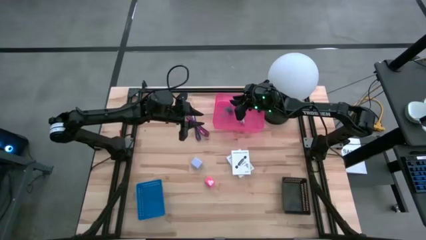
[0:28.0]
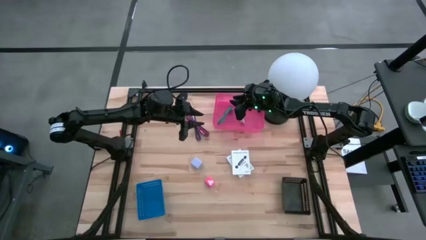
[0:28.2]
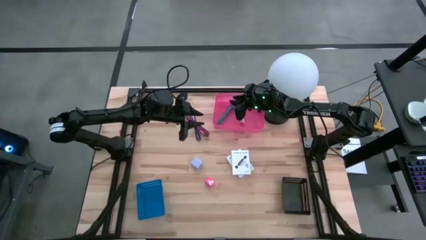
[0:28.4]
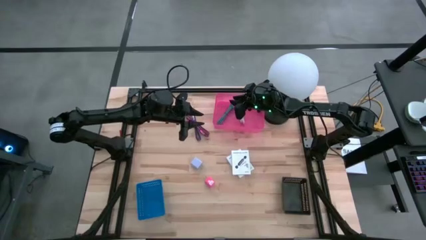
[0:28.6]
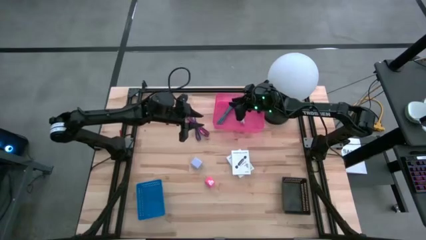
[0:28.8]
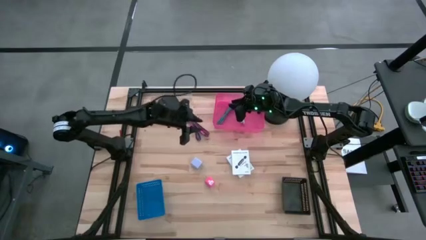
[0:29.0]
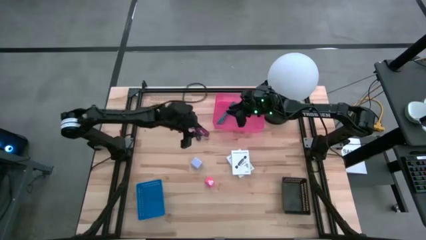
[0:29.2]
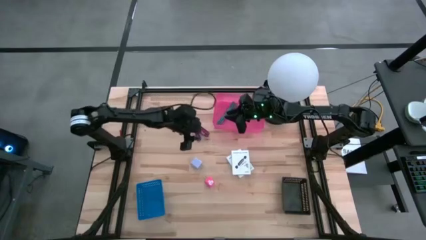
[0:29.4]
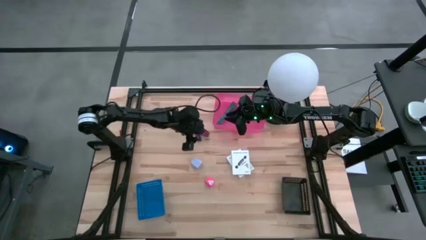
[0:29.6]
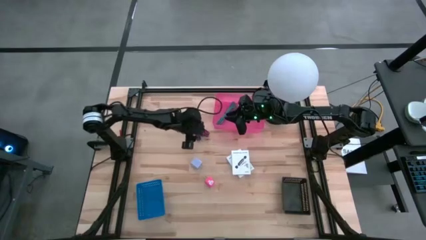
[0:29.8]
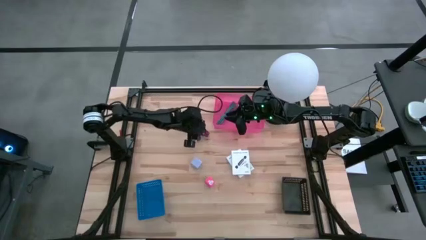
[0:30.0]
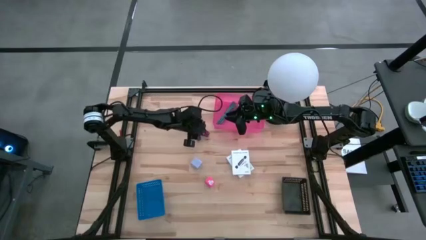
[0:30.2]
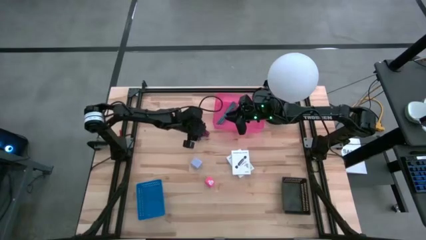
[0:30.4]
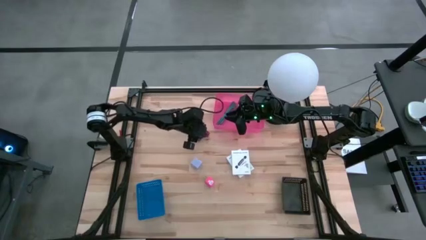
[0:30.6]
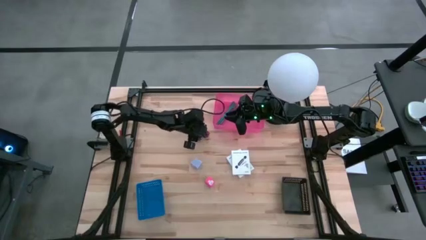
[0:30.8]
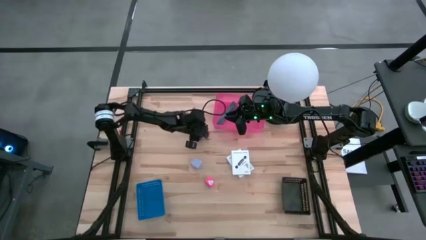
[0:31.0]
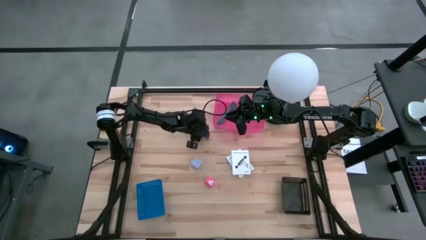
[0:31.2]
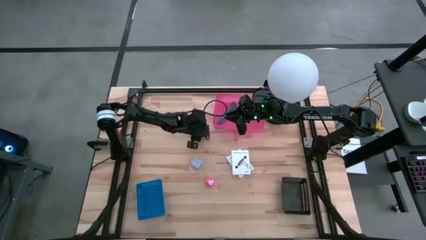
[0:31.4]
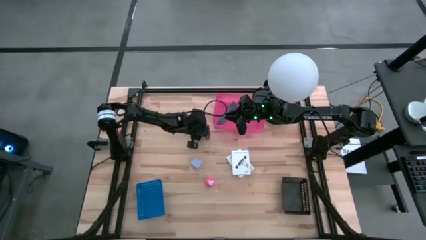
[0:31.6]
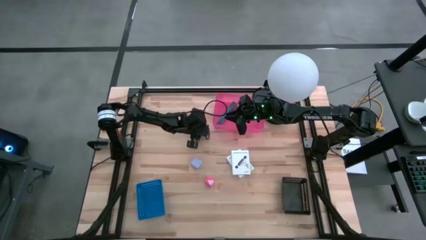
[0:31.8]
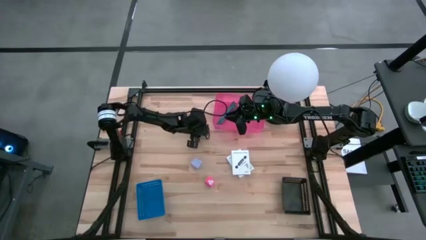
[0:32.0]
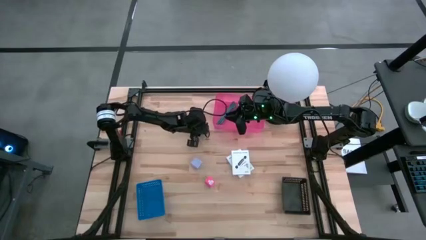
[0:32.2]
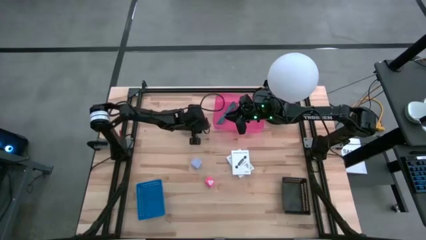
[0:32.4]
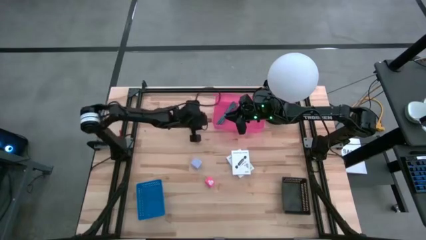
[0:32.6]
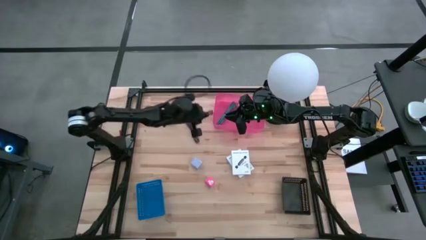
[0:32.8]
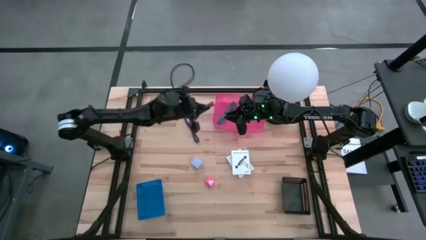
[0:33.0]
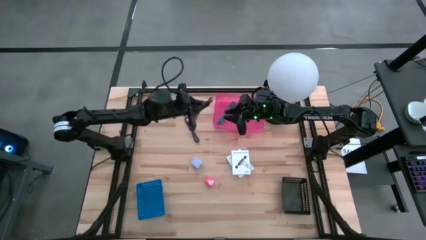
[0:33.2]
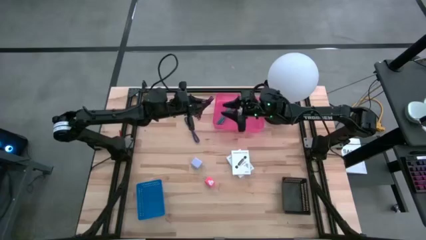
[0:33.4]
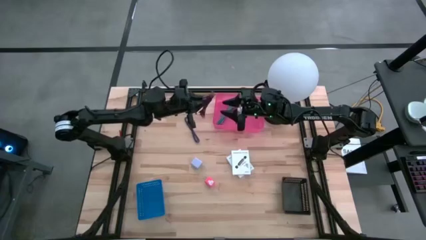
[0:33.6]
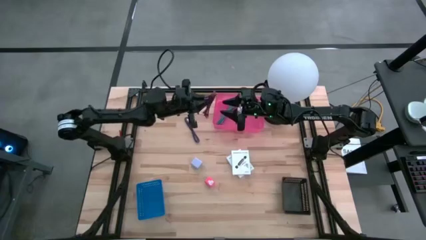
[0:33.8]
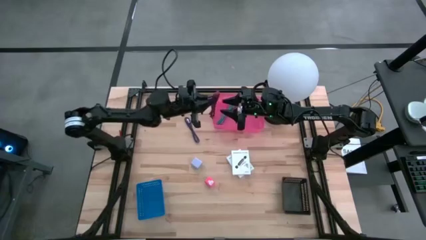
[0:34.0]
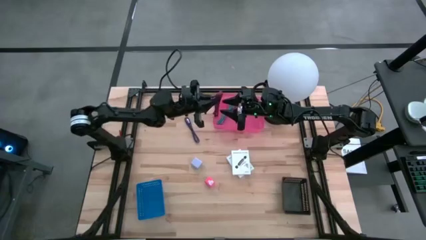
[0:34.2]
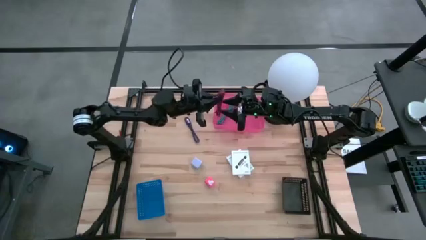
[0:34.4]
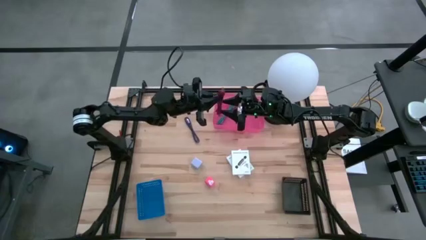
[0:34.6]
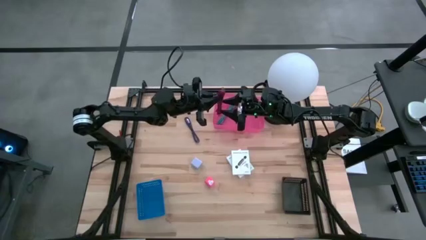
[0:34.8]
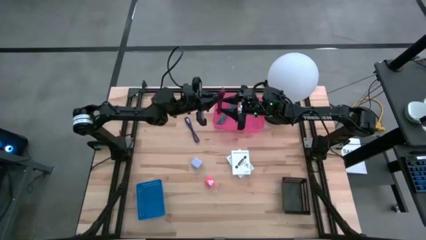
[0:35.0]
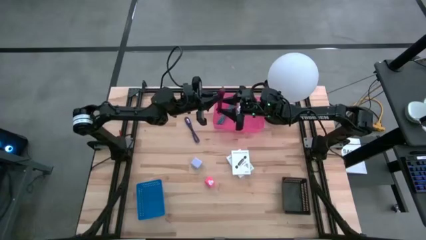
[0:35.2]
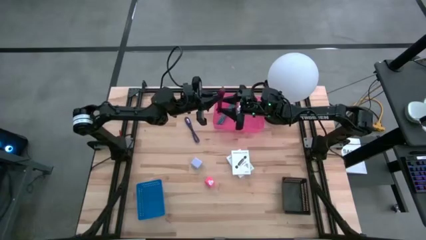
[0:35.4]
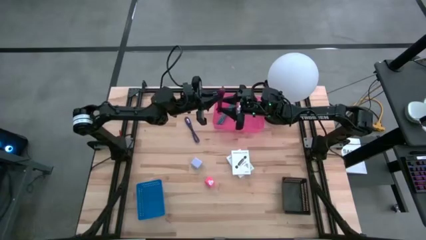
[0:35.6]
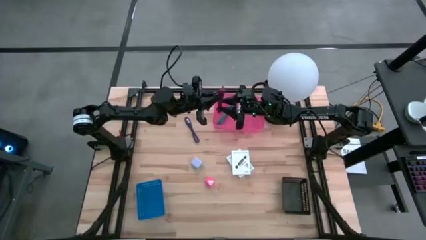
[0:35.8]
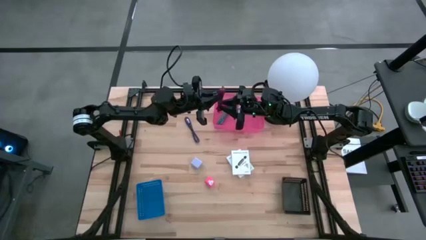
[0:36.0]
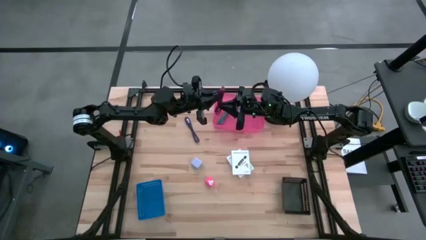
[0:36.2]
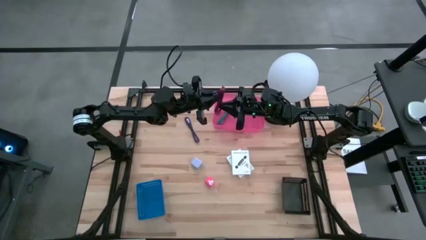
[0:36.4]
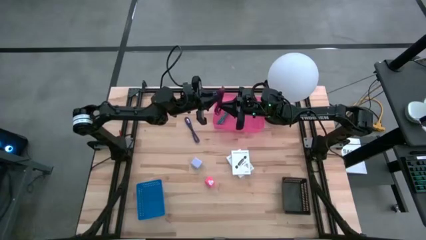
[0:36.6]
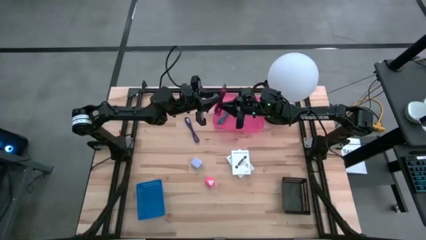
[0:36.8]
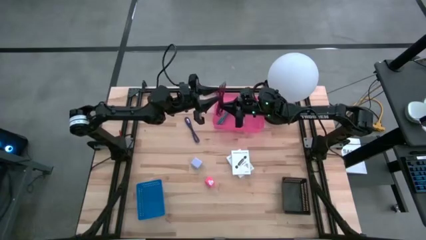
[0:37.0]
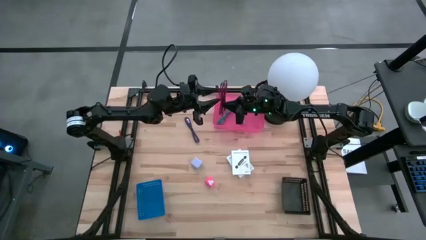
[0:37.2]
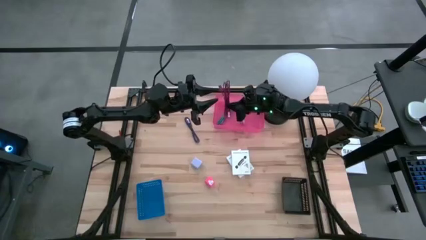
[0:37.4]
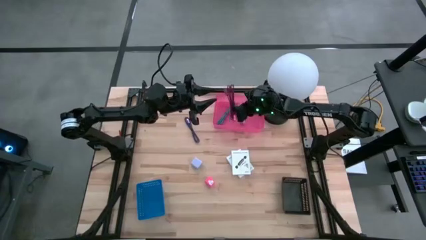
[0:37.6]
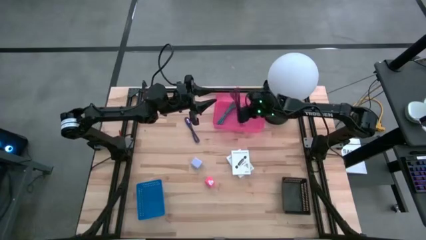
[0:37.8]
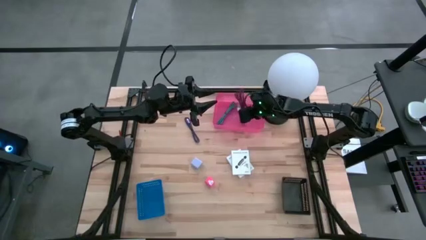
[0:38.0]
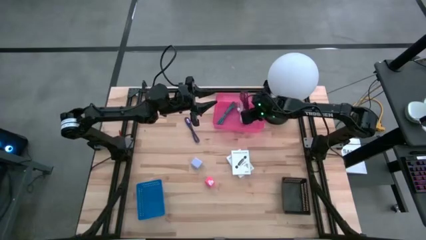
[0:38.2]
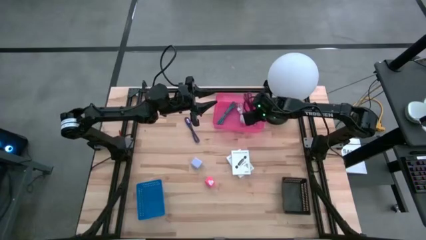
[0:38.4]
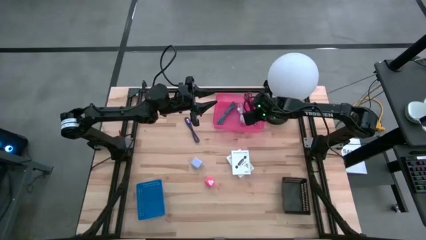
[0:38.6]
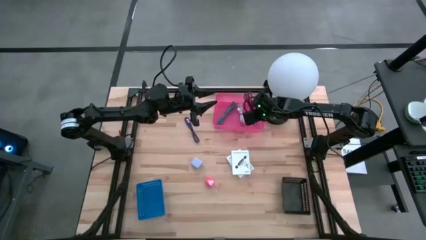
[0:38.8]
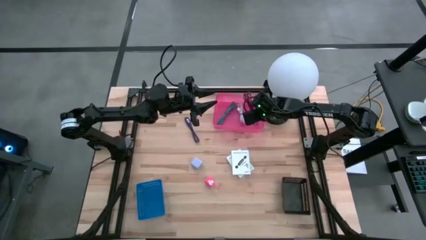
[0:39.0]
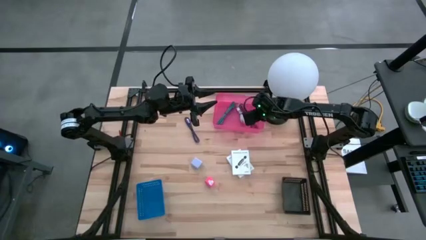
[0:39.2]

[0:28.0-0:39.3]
Task: Pick and place items into bin
Put the pink charger cable into the pink bin
